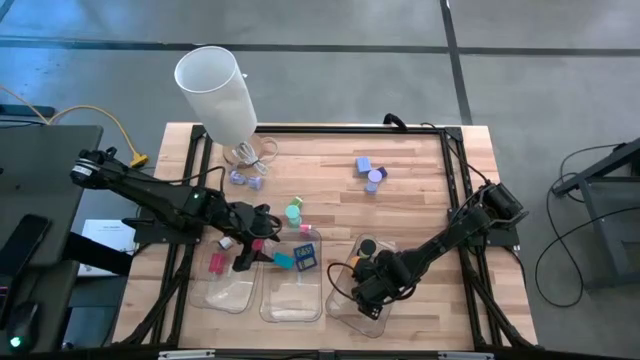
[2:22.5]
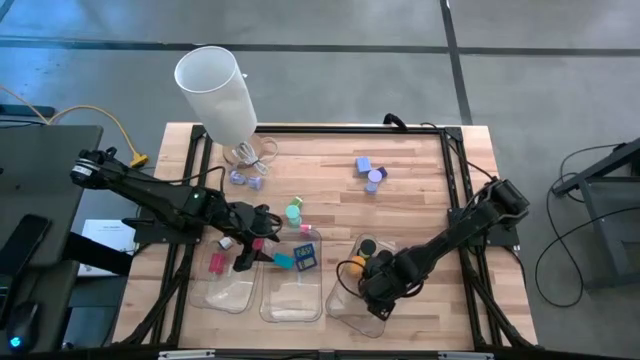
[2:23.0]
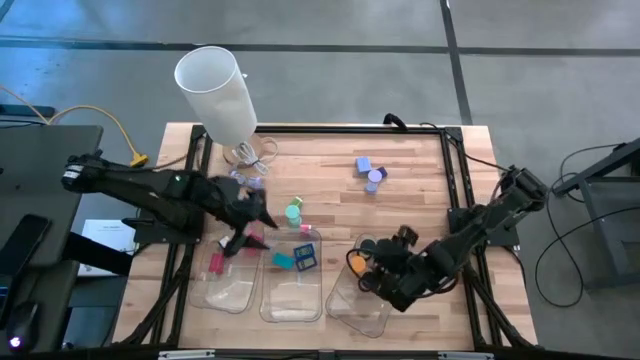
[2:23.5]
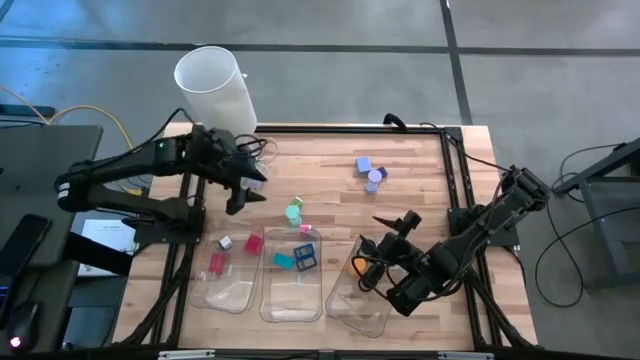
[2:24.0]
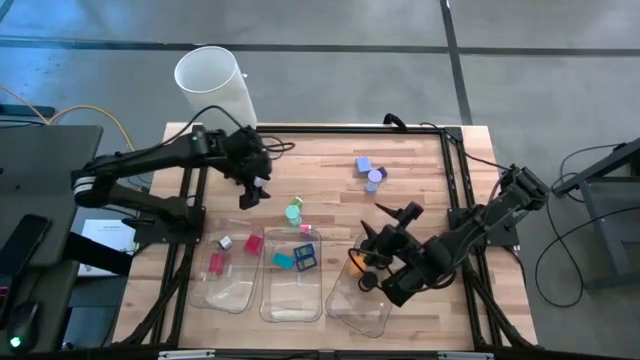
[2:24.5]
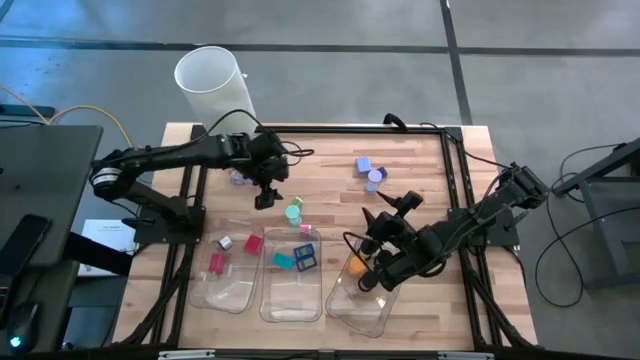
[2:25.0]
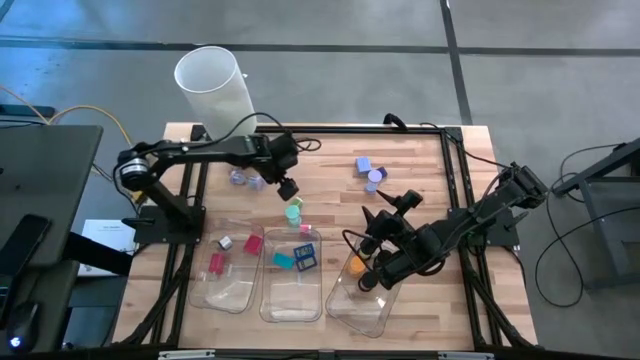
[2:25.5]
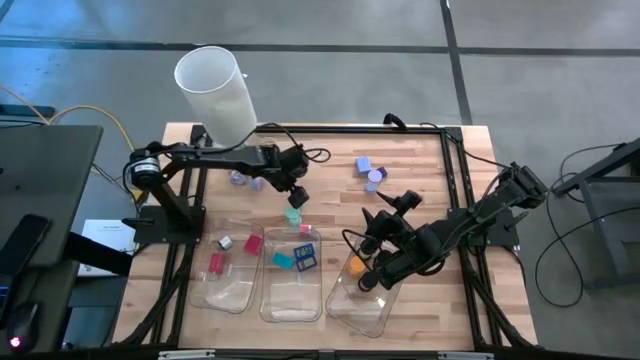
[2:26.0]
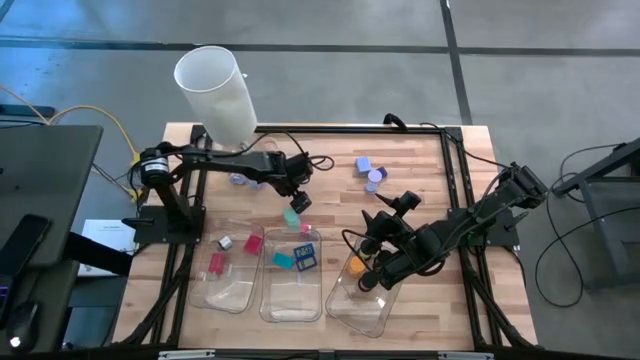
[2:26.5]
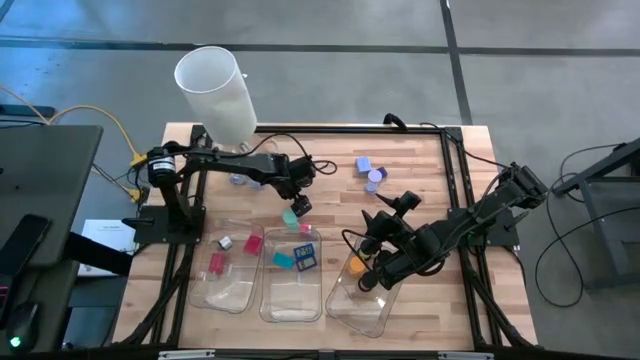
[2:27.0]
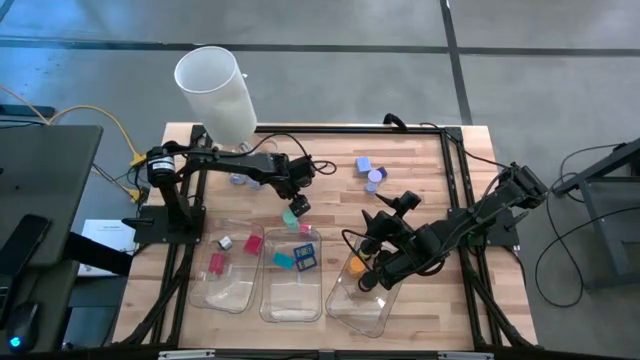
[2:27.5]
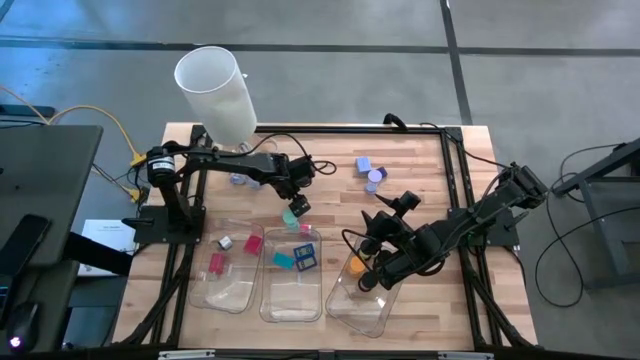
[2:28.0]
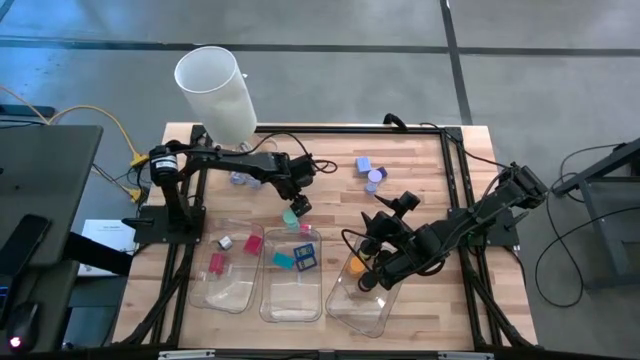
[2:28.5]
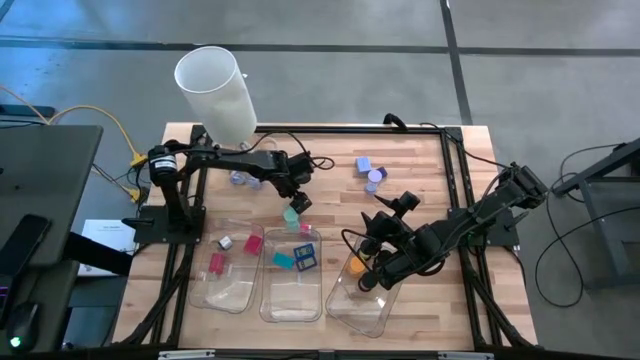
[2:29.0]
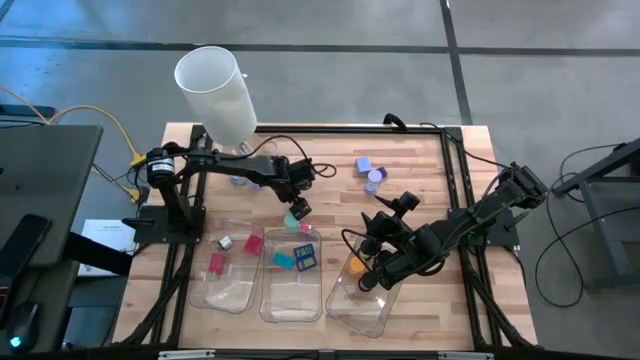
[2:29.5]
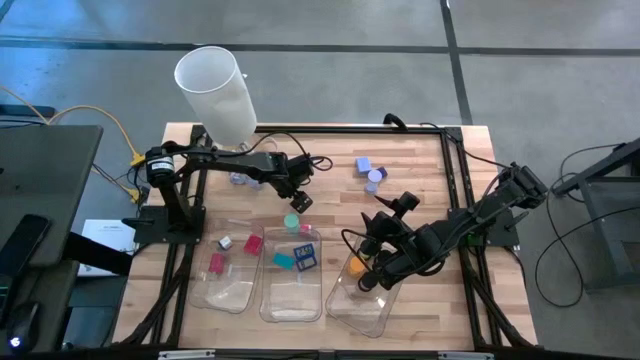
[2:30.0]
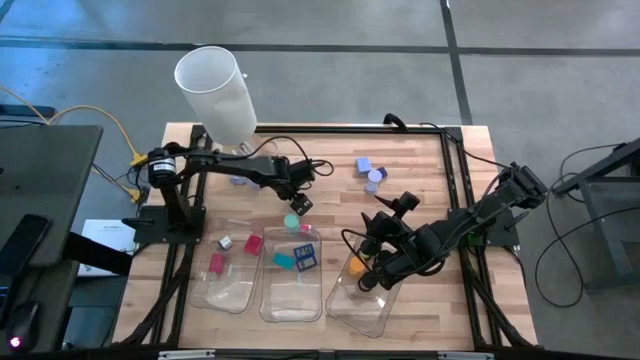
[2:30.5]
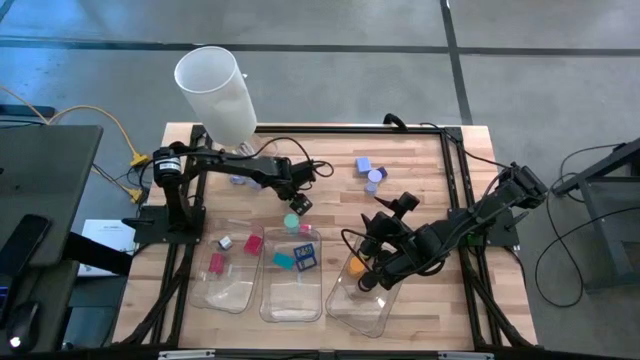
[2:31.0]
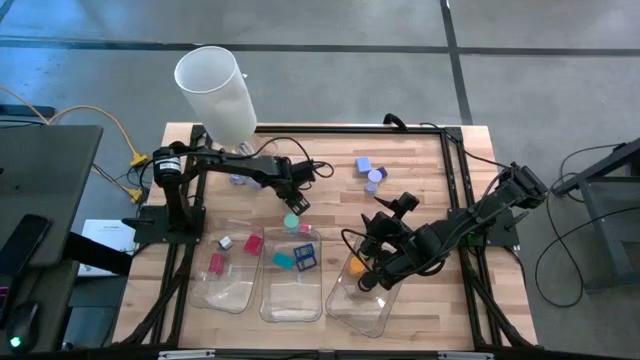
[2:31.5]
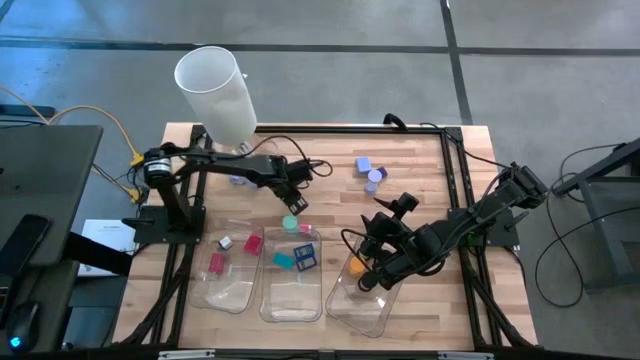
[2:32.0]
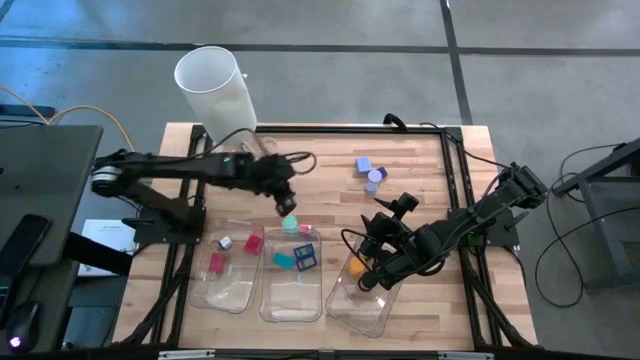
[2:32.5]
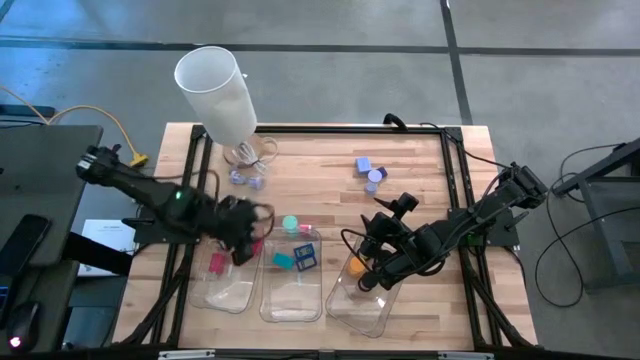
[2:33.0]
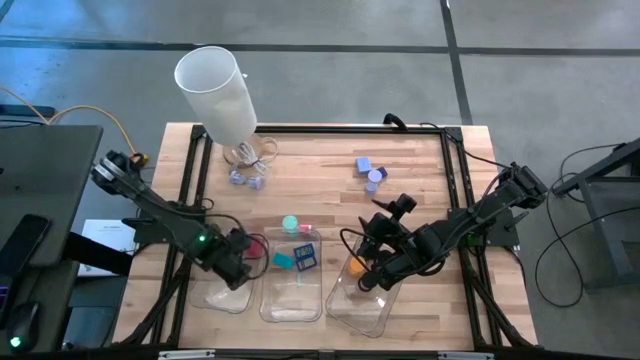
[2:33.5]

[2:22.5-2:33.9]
Task: Pick & Place Office items
Put the green adapter into the left bin

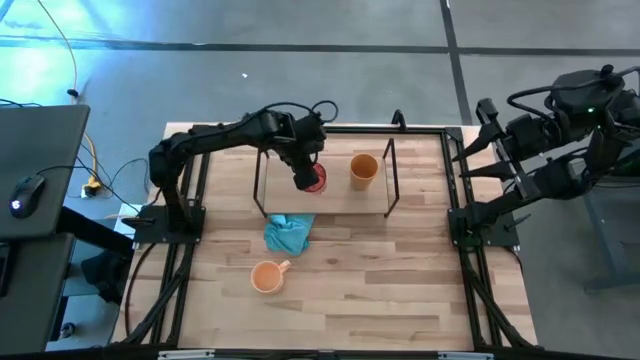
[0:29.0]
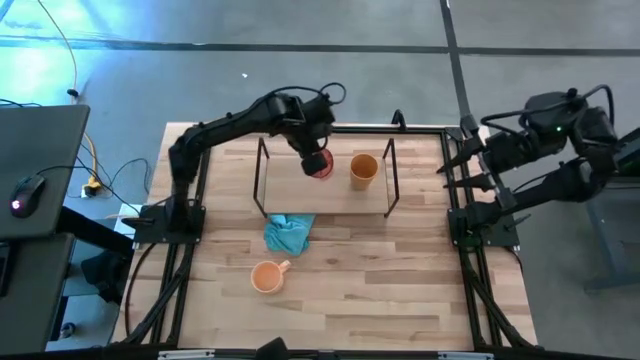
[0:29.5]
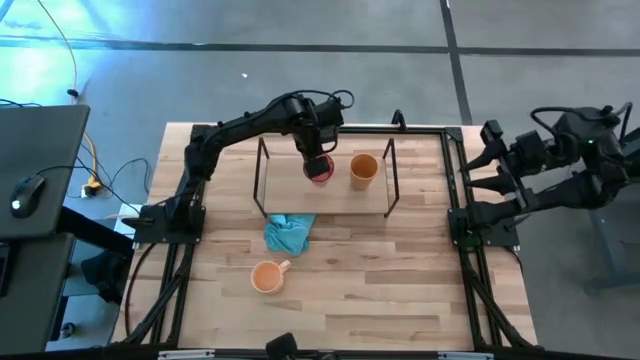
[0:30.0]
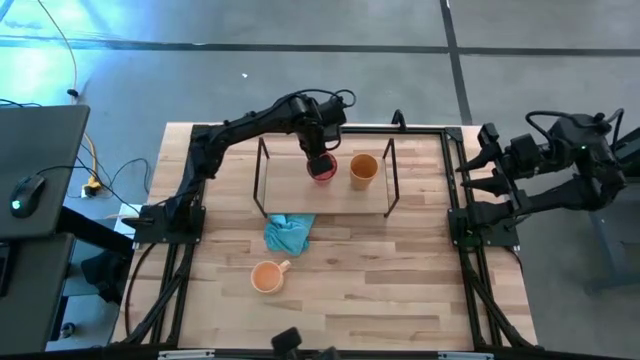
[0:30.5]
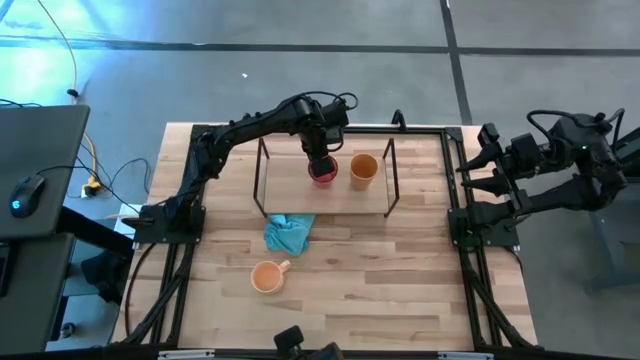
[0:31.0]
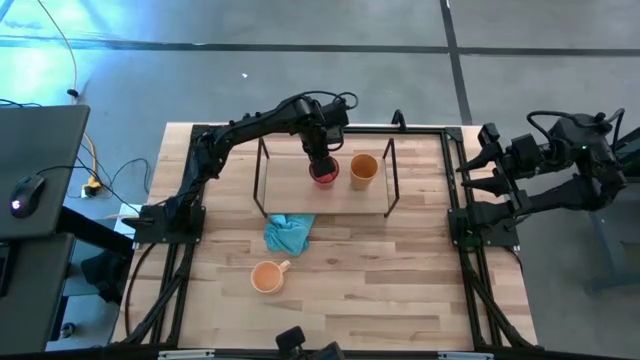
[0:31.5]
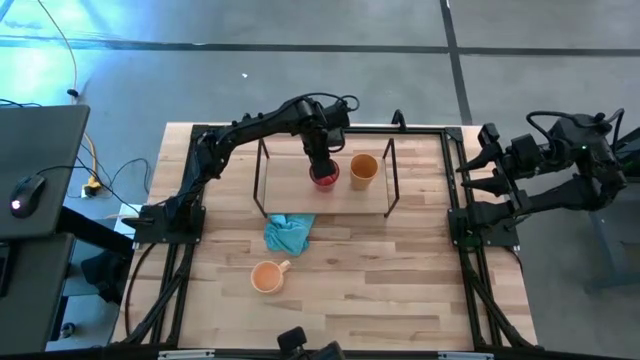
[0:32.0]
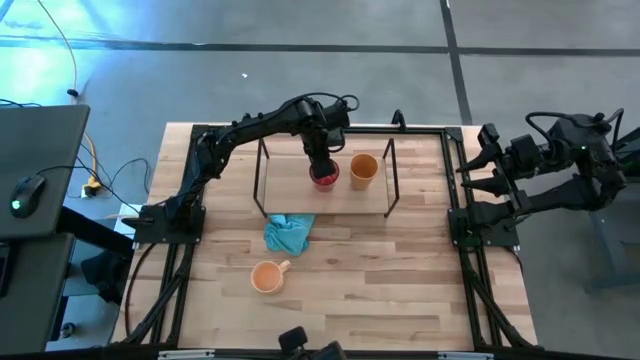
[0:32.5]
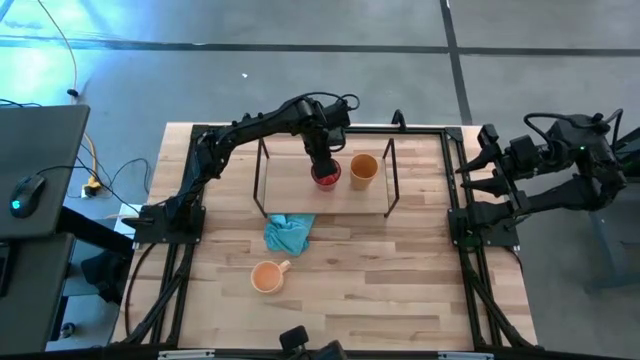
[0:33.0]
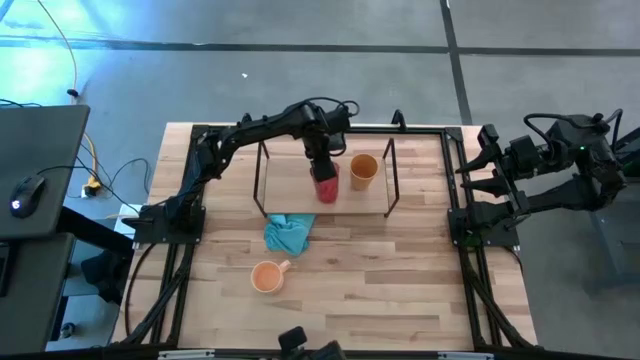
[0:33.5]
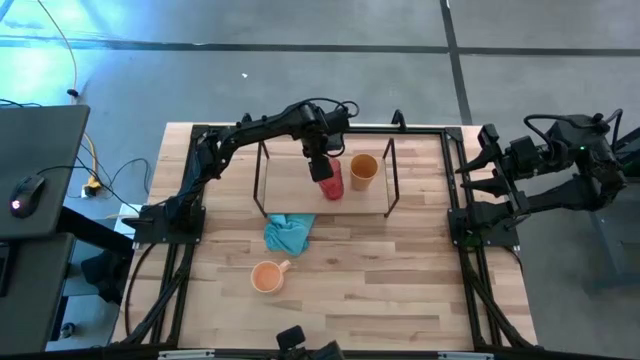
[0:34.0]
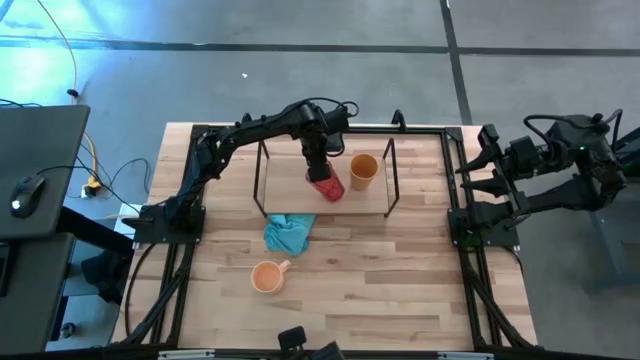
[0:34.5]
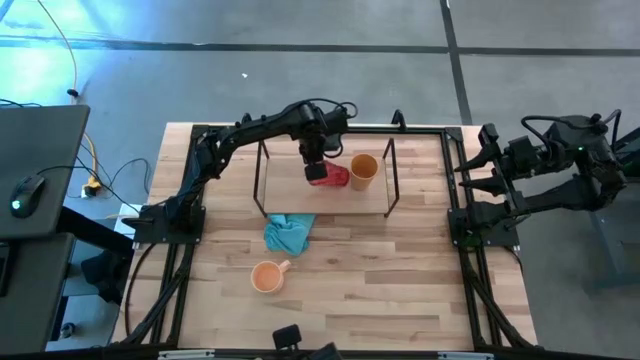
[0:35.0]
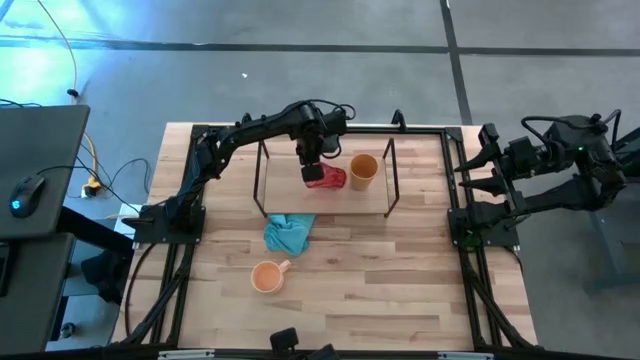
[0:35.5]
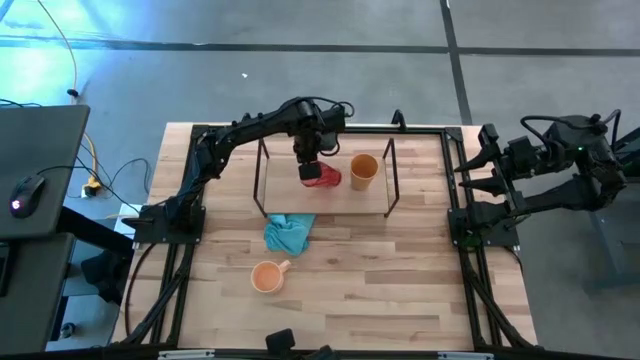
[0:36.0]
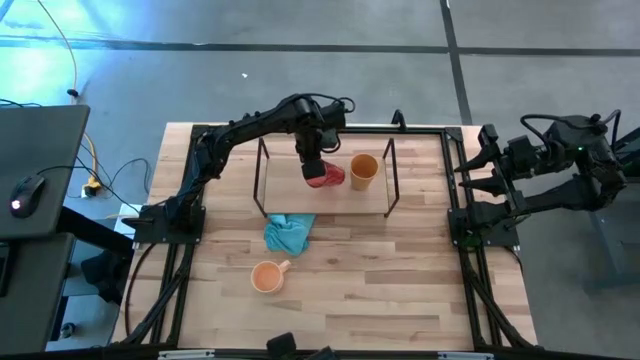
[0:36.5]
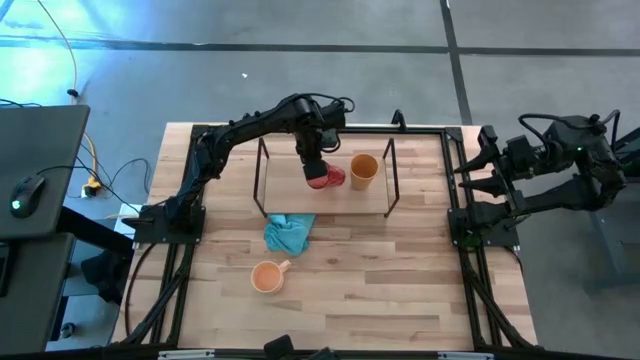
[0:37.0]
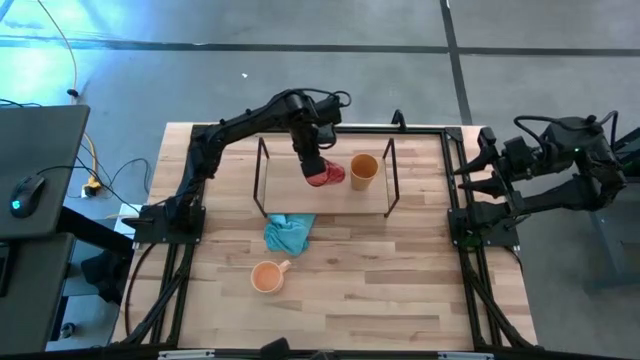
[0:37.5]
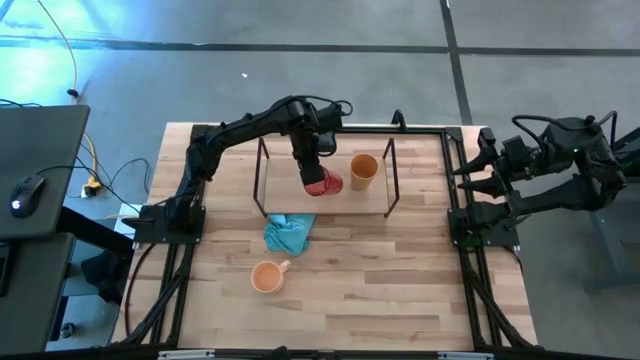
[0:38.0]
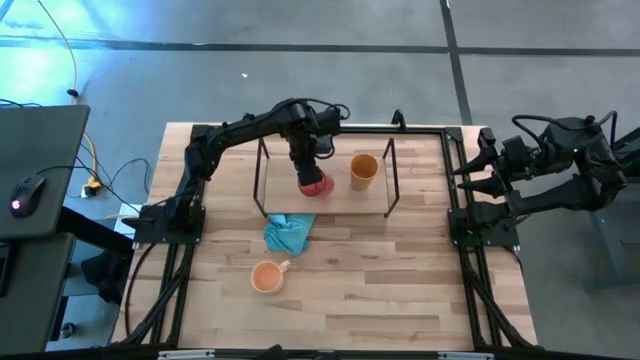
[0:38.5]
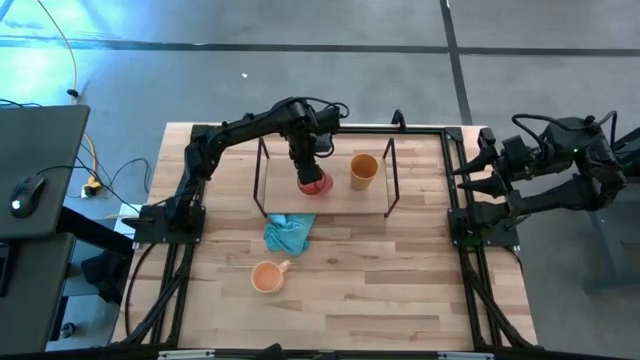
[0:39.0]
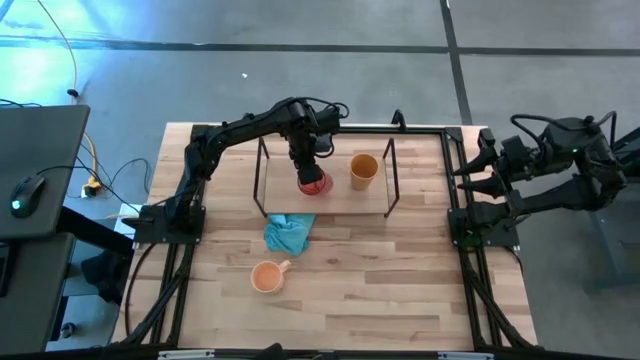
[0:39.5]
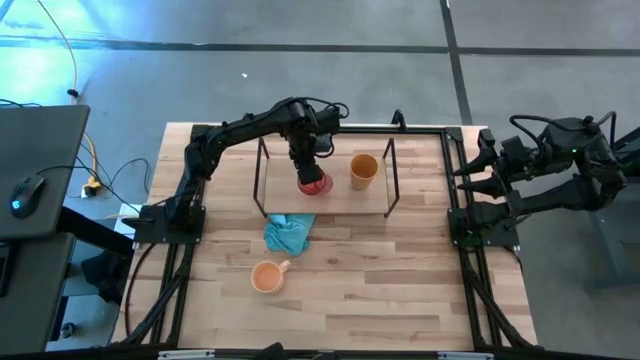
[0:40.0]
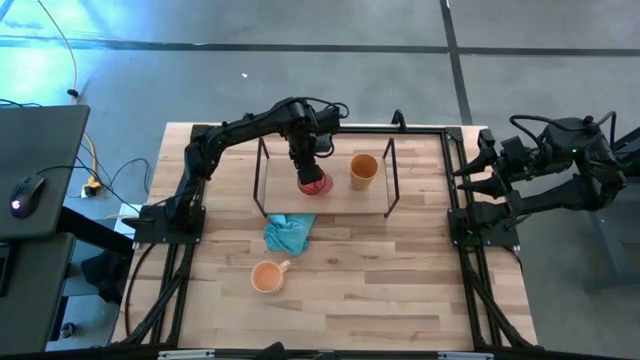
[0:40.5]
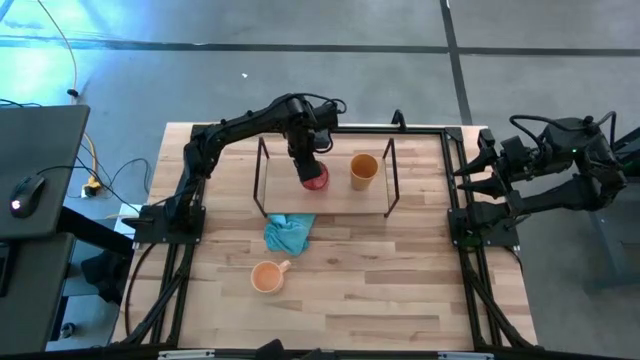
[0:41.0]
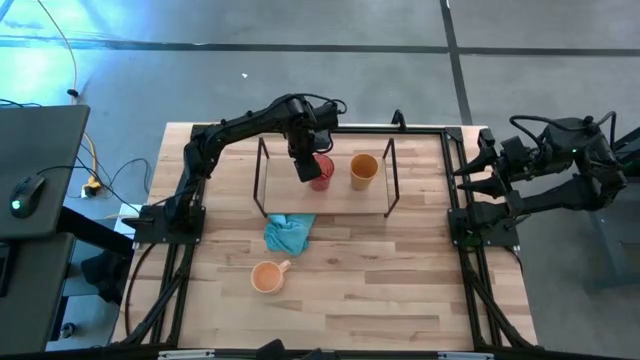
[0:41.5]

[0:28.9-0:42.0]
Task: Stack small to large cups/mugs on shelf
Put the red cup on the shelf
